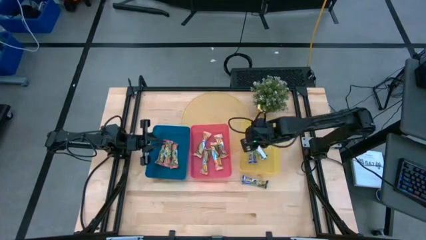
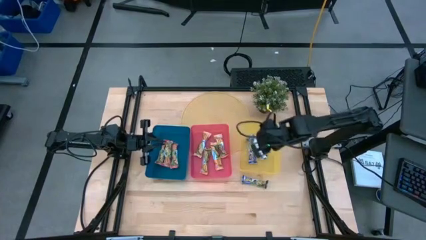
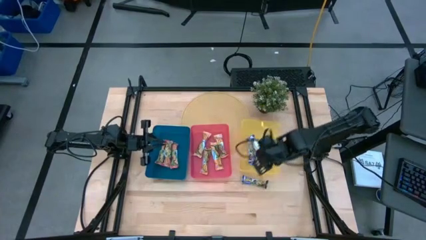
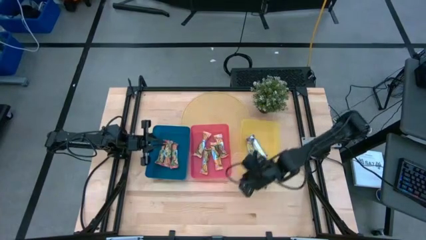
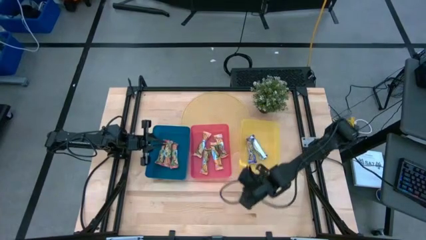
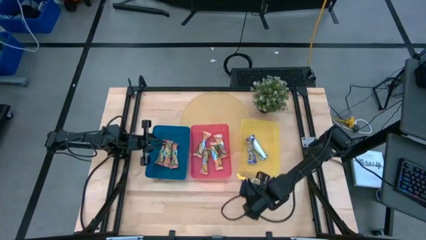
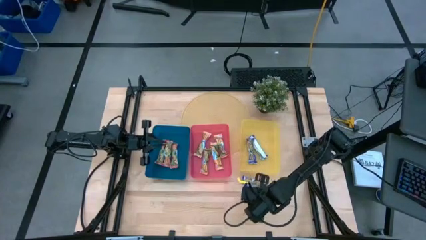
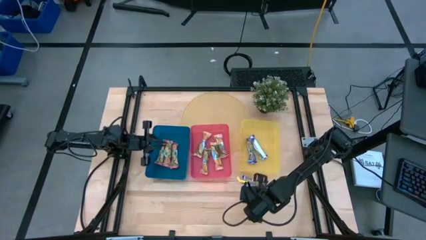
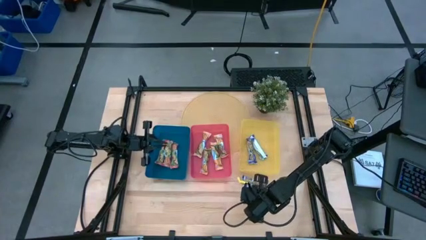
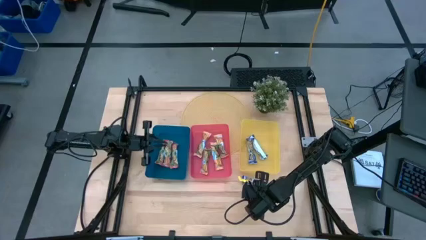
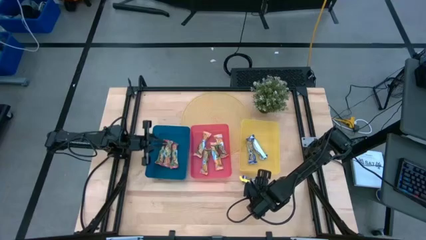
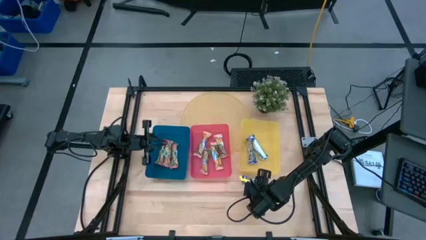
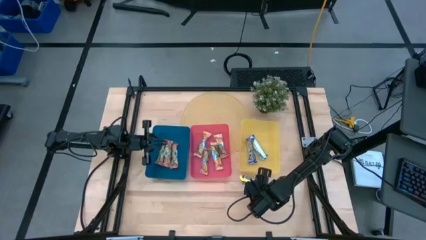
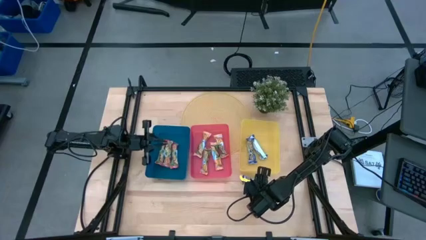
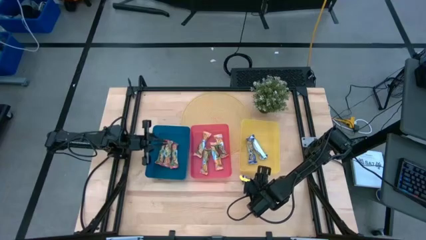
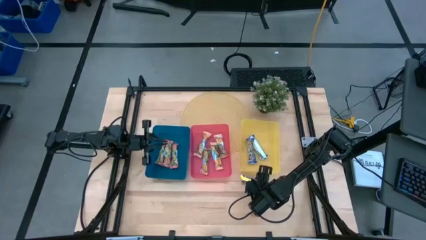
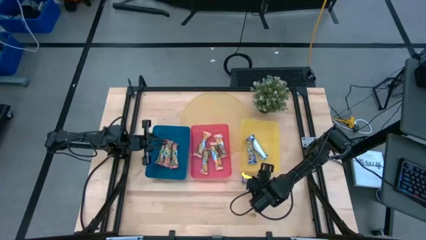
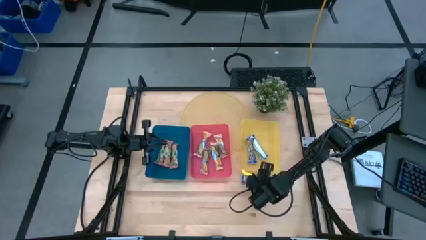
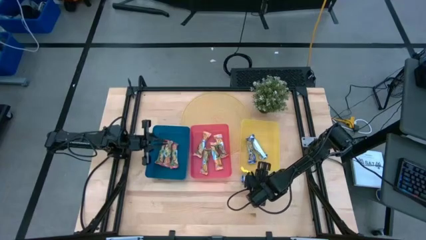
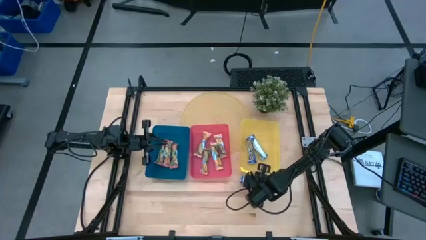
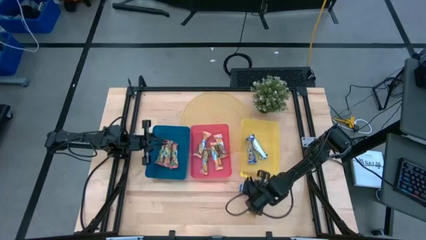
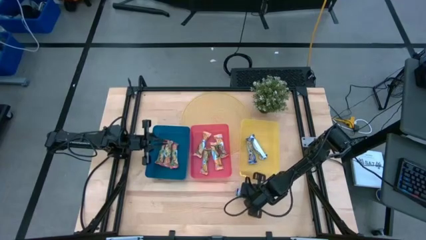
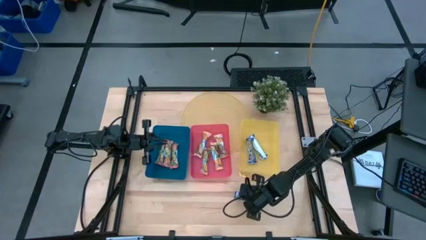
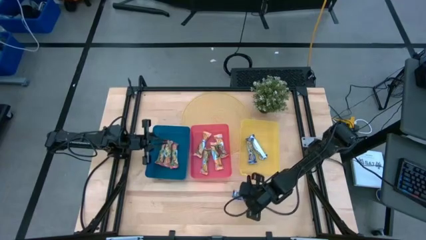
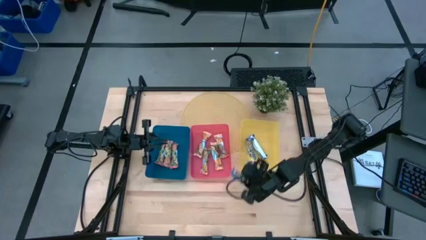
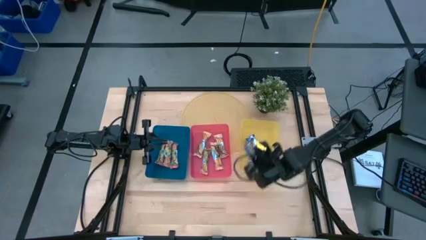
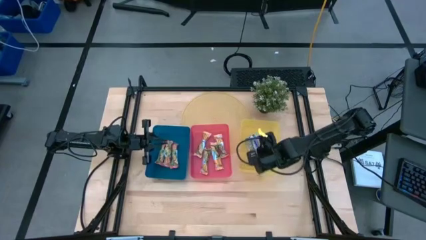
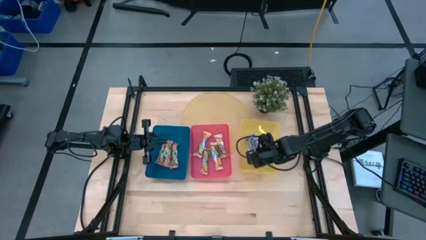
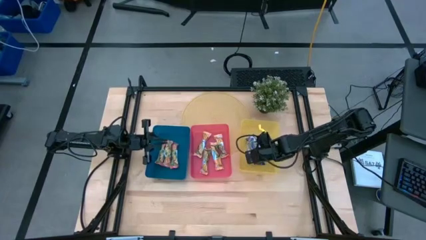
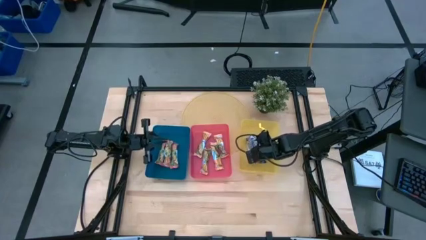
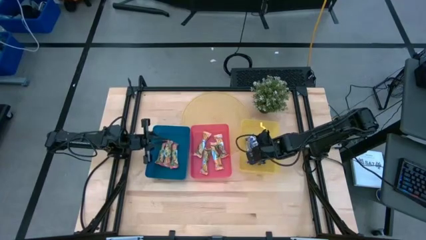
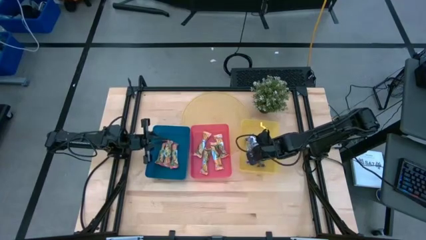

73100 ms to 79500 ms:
Task: Pick and place Granola Bars by type
Put the blue granola bar into the yellow bin

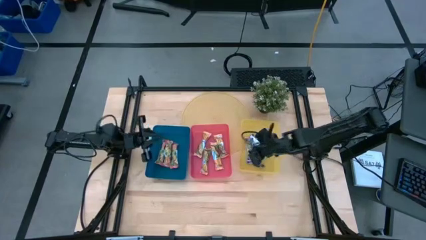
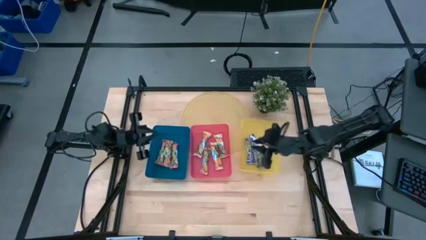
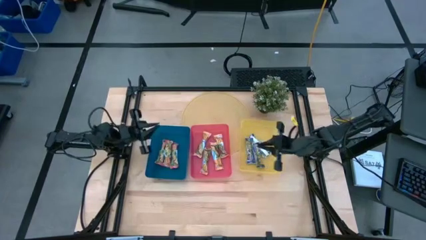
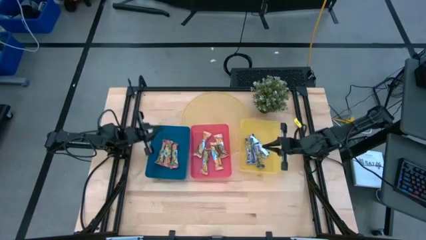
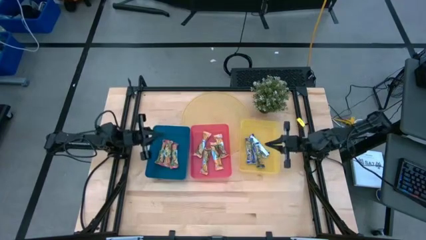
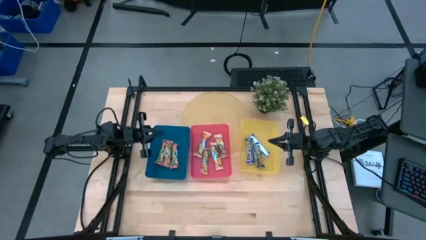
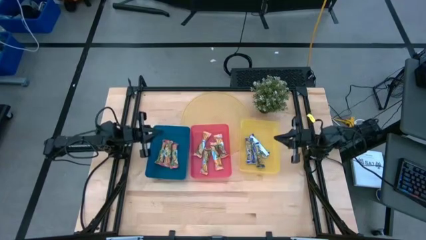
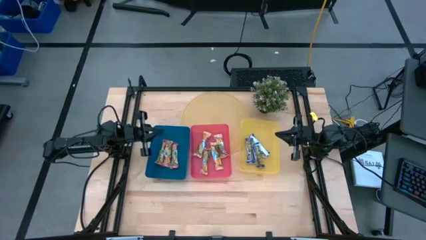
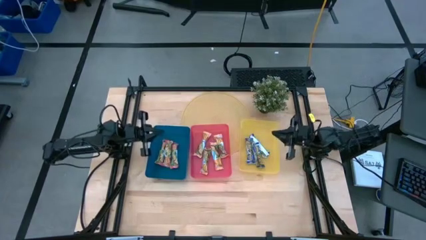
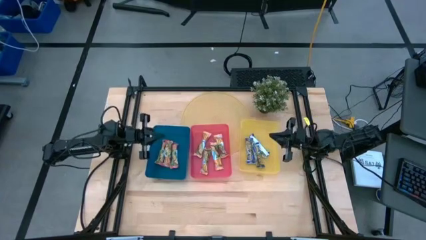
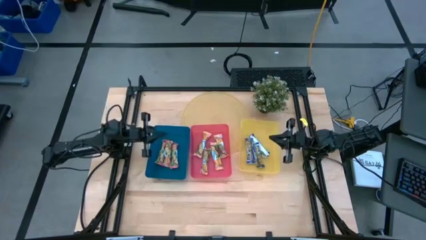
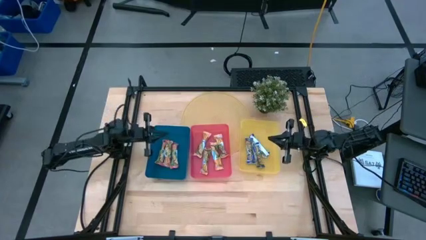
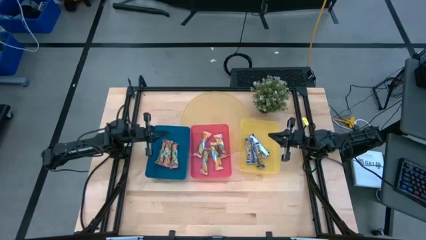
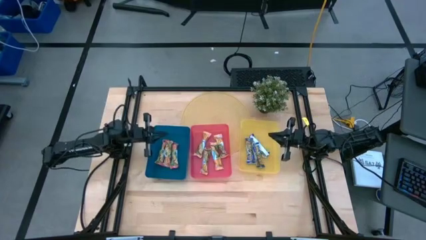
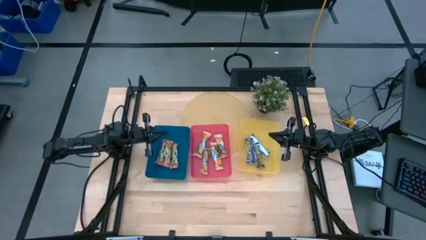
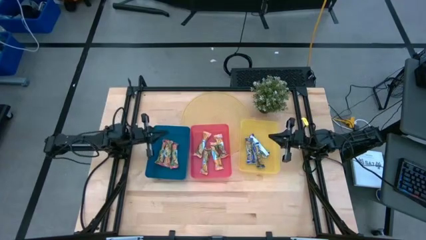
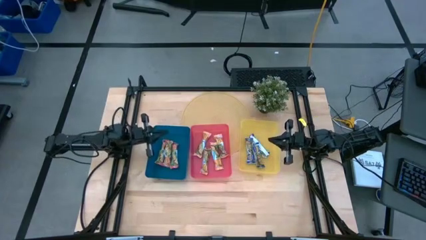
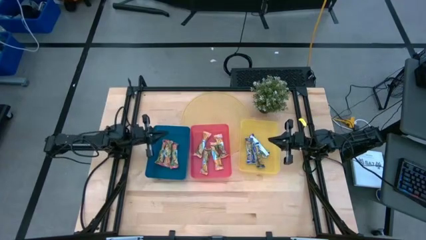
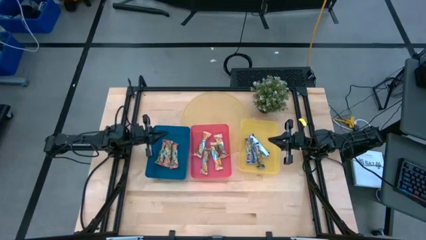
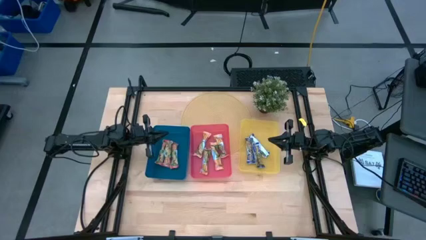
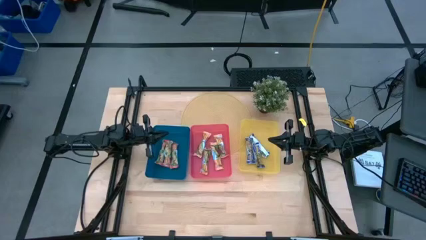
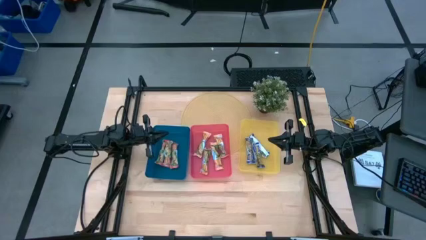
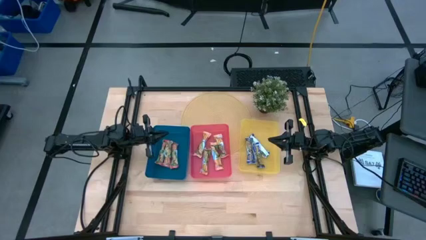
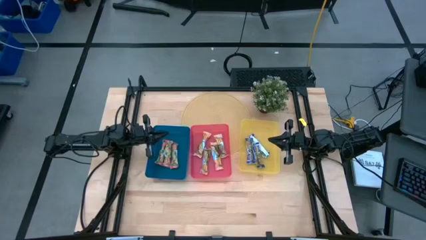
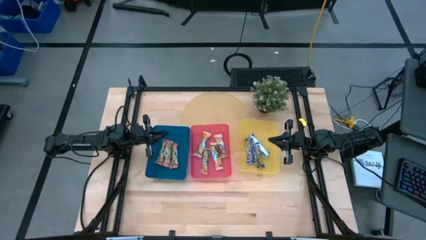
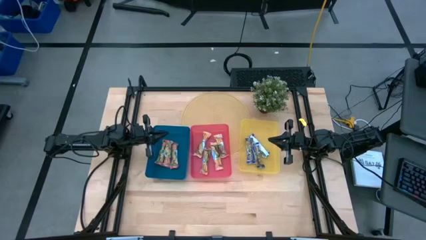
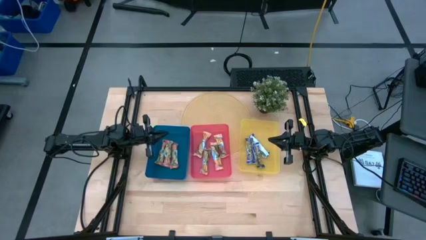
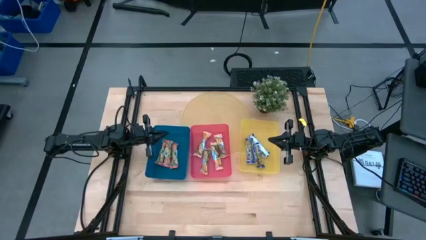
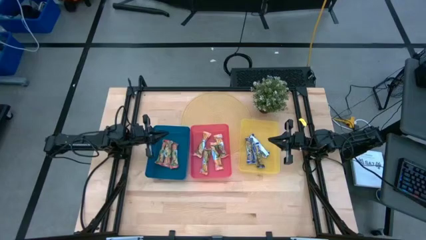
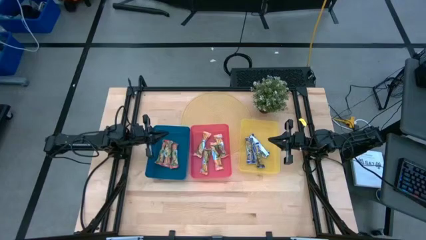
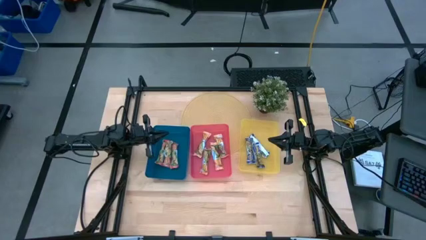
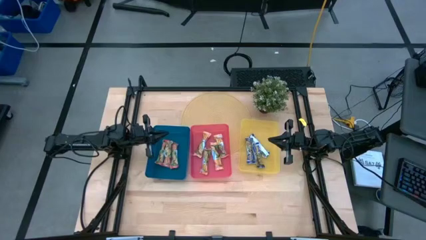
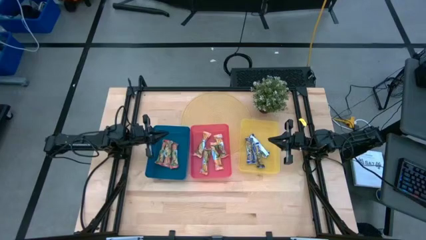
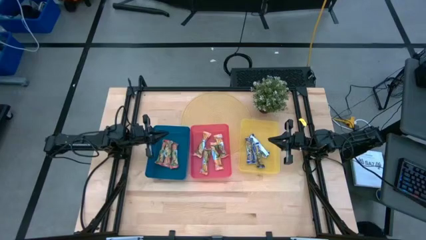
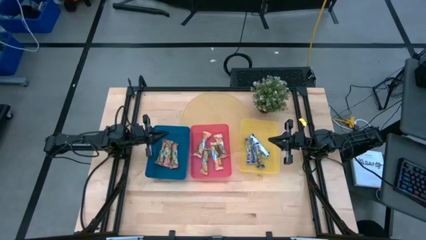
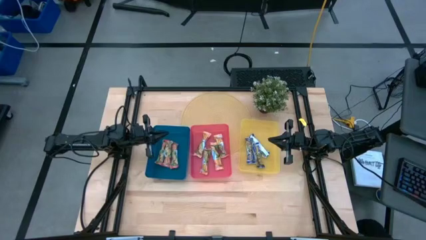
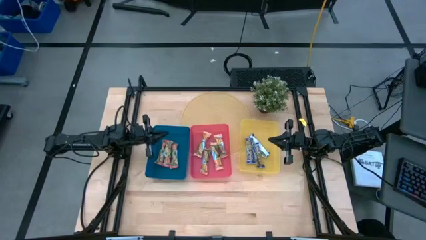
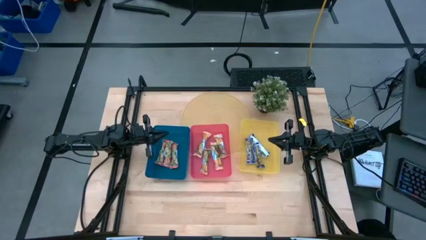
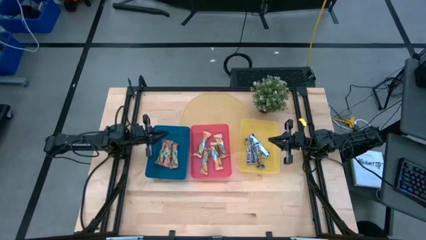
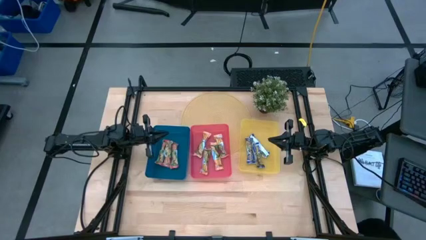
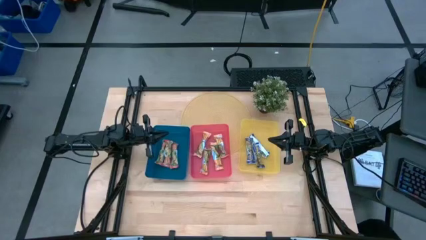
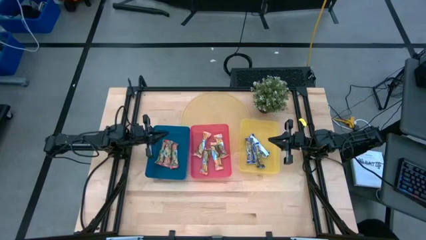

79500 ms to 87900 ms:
Return to Home Position

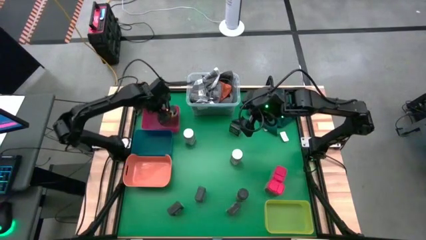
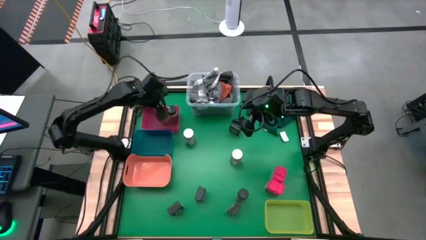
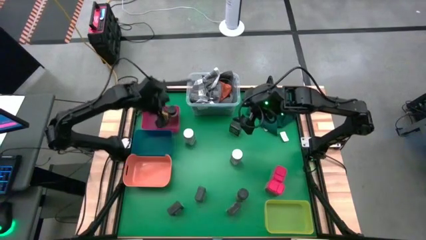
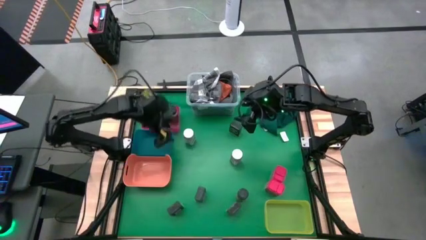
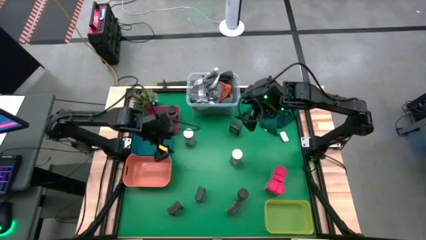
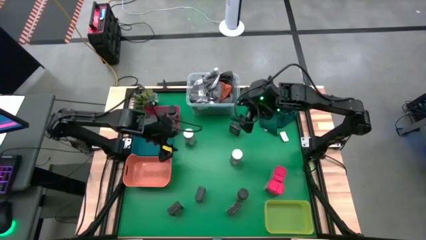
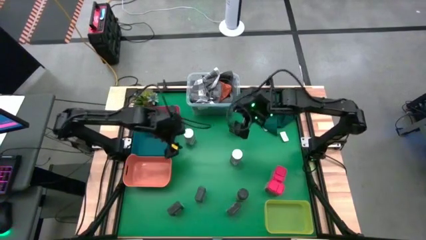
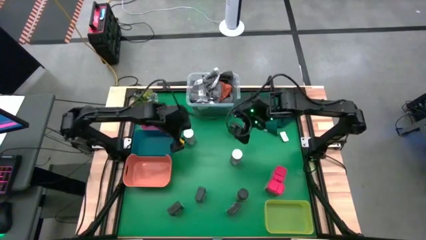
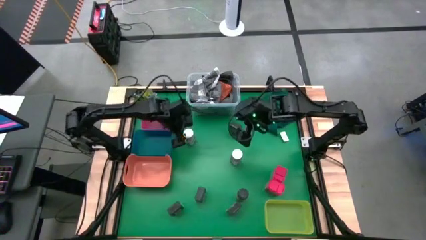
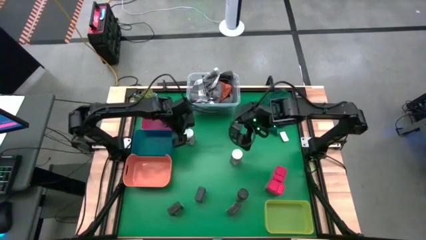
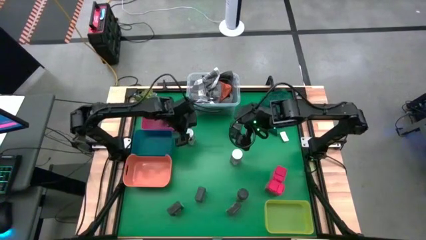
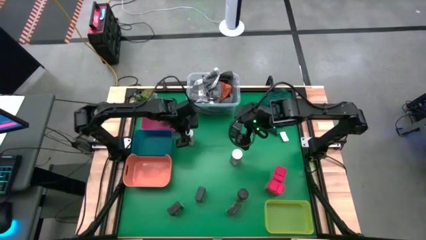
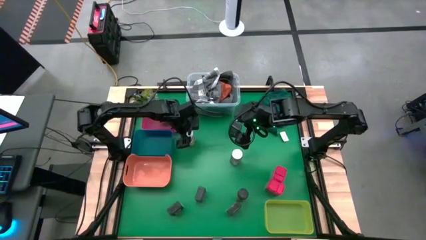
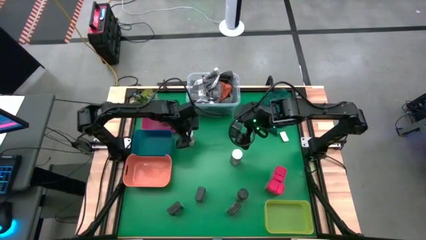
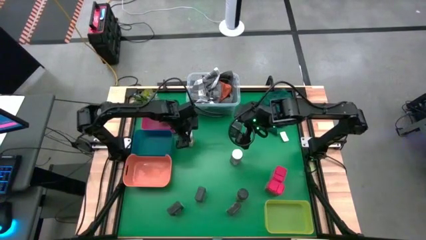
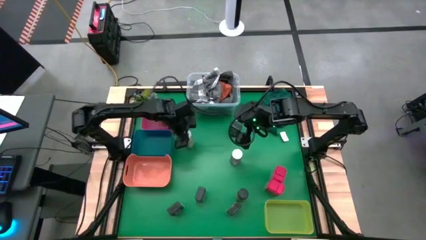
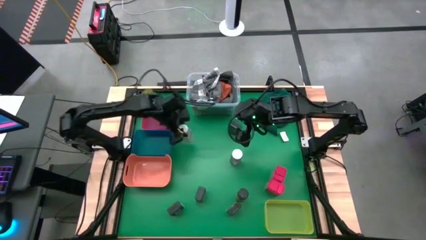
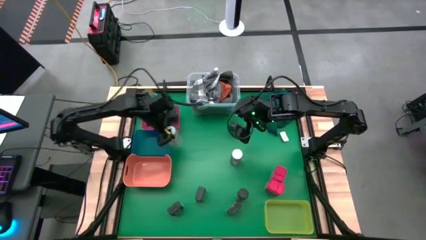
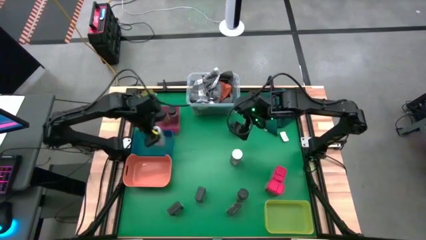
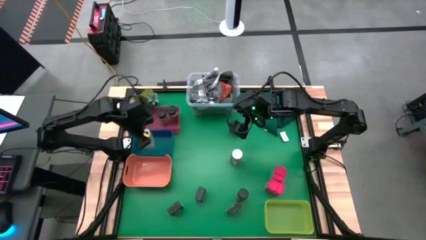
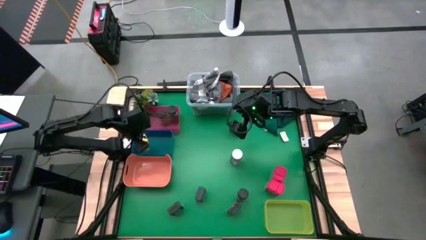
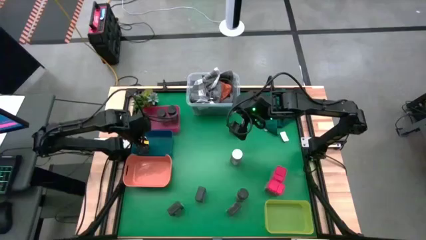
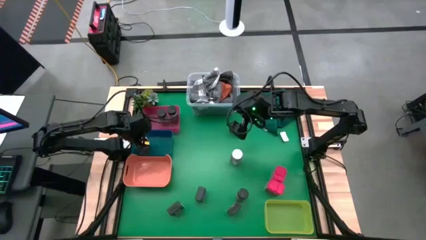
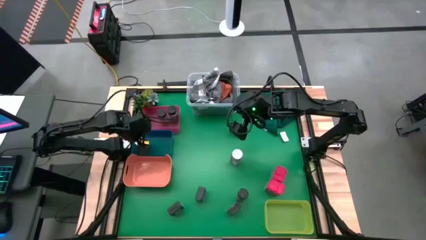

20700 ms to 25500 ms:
Task: Sort spices by type
Put the left white spice bottle into the blue bin
